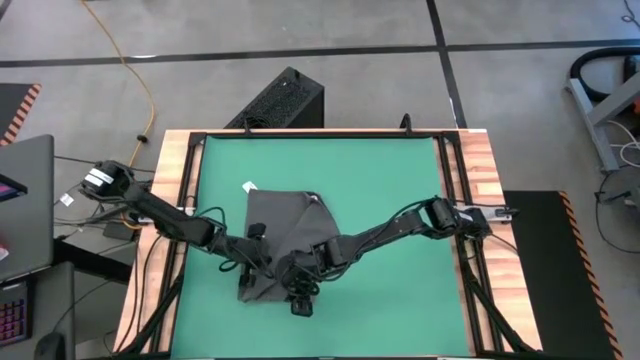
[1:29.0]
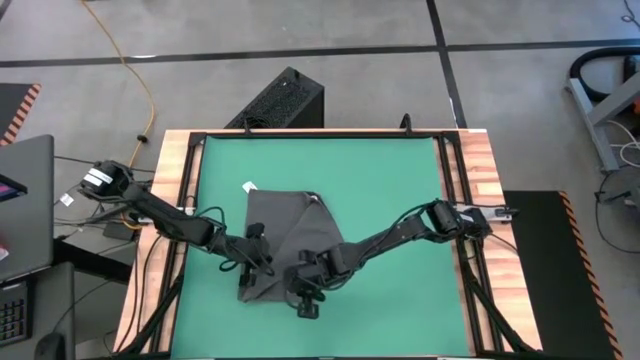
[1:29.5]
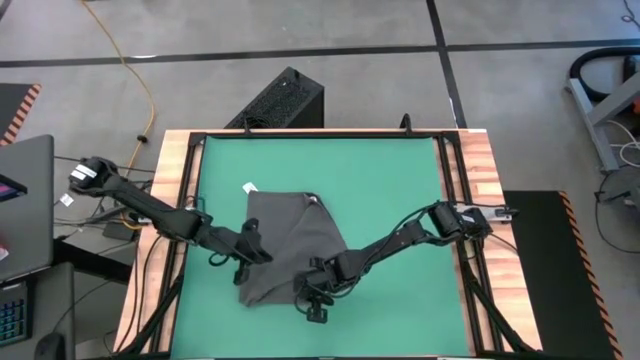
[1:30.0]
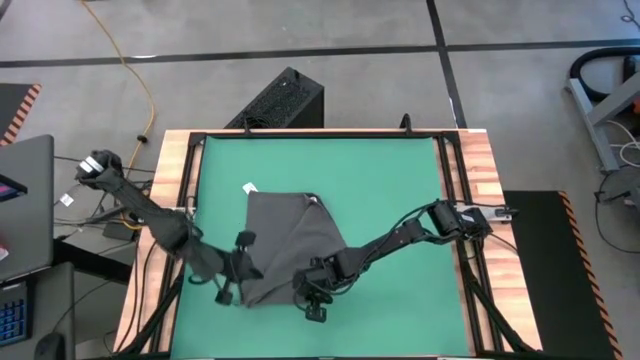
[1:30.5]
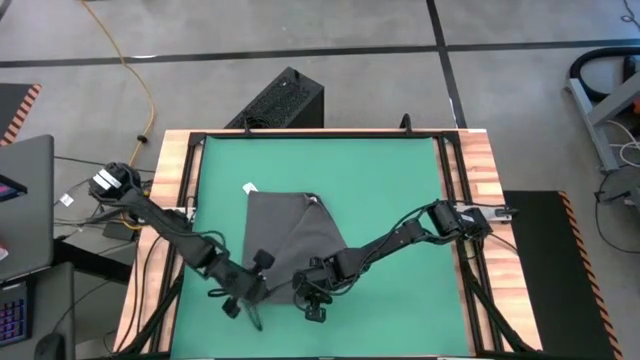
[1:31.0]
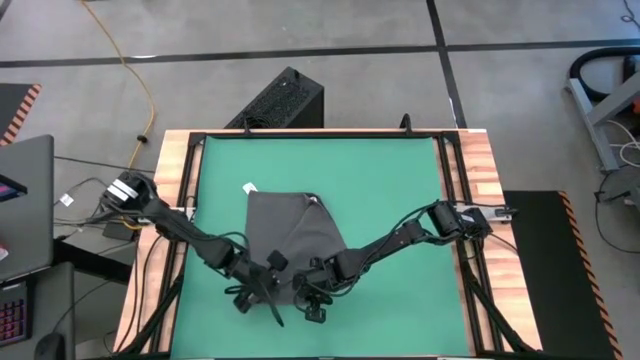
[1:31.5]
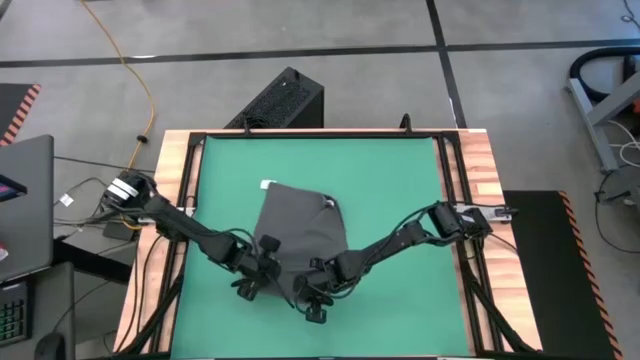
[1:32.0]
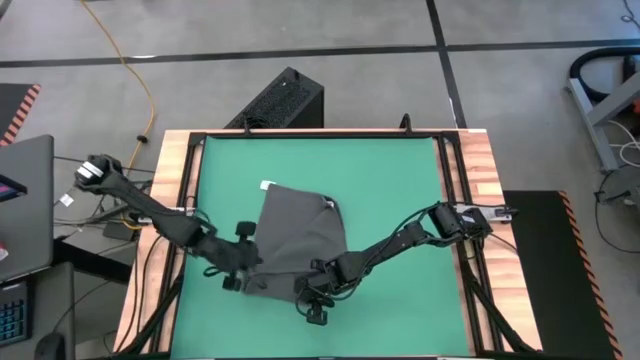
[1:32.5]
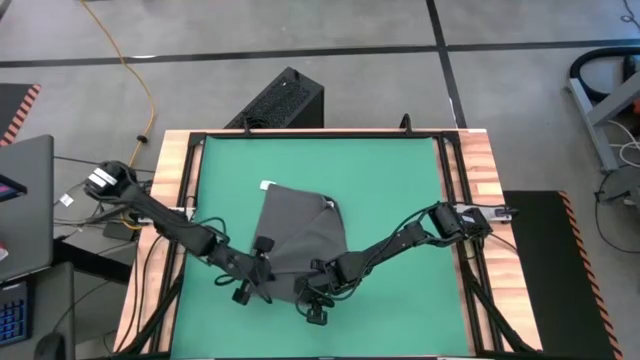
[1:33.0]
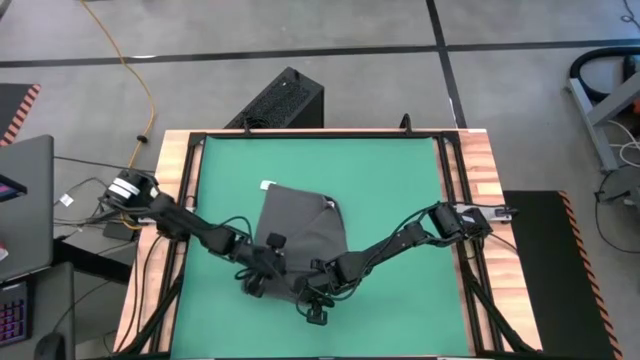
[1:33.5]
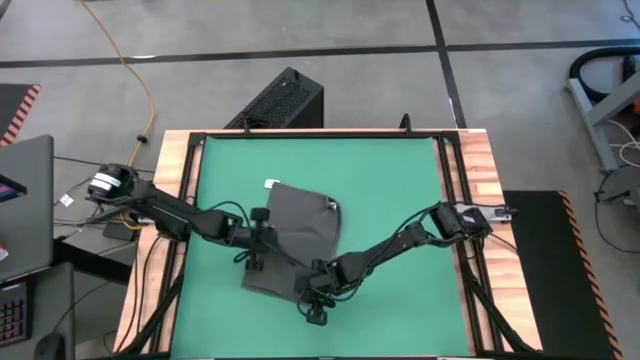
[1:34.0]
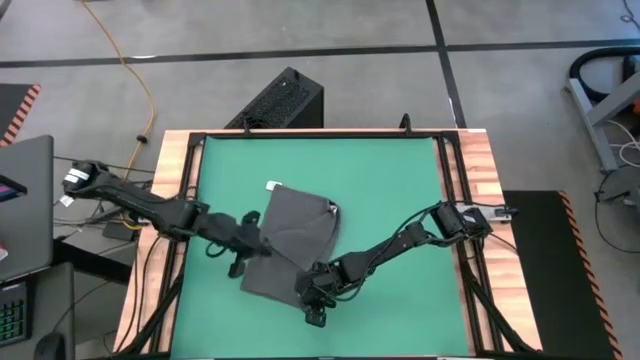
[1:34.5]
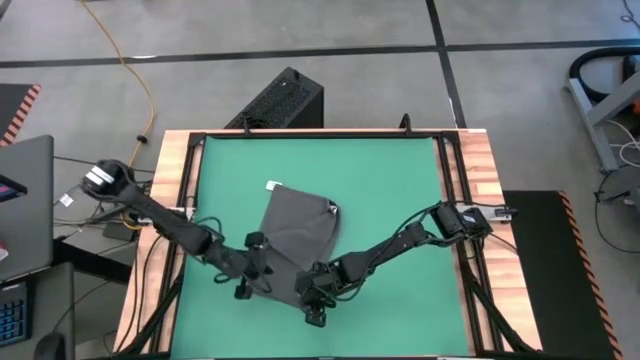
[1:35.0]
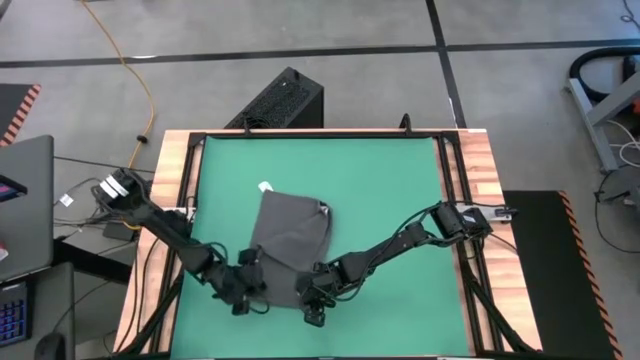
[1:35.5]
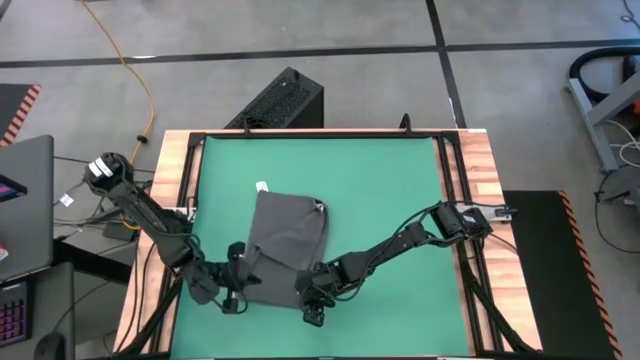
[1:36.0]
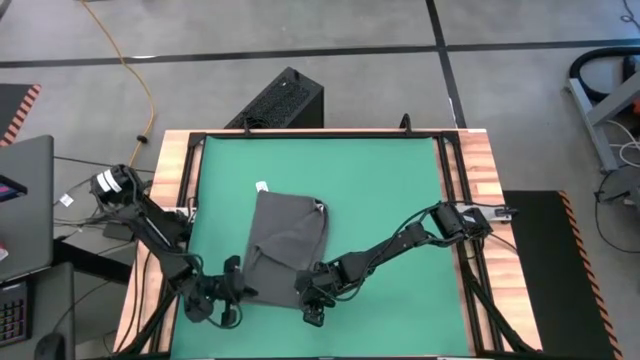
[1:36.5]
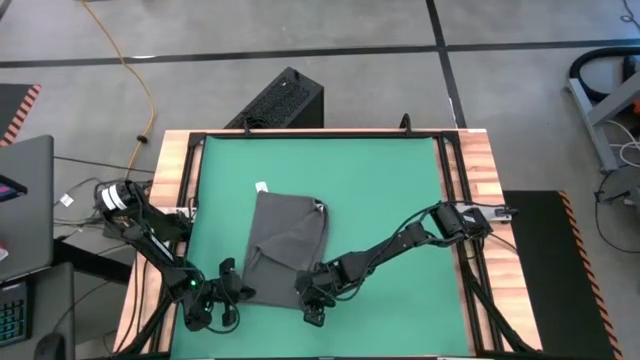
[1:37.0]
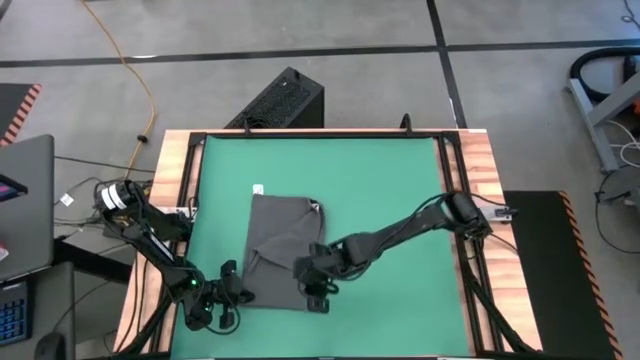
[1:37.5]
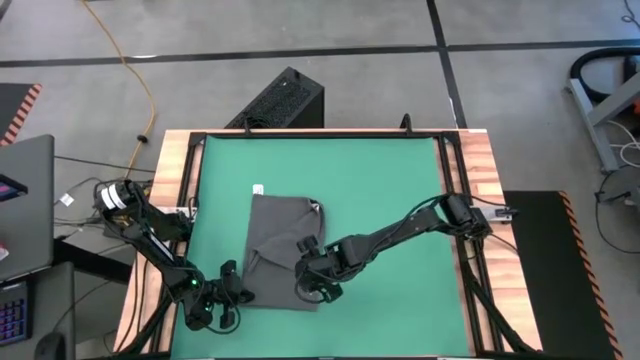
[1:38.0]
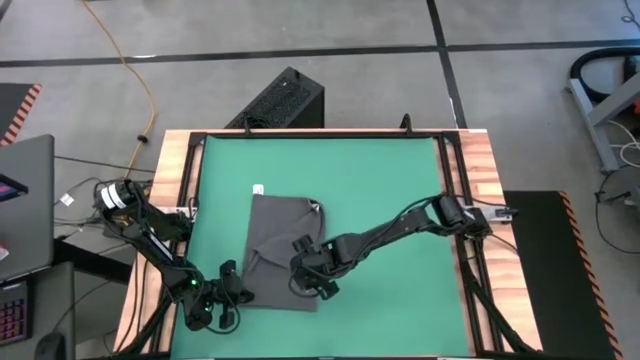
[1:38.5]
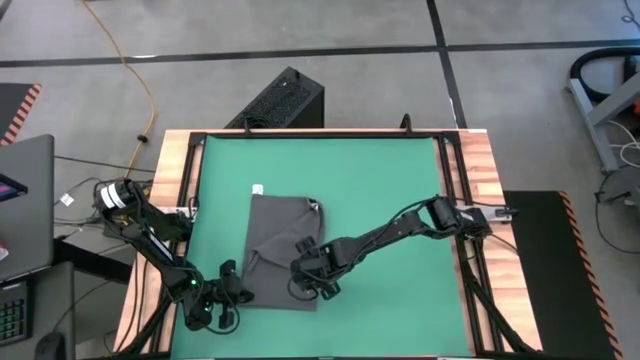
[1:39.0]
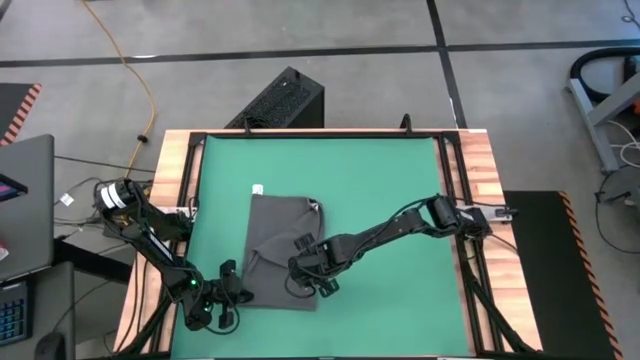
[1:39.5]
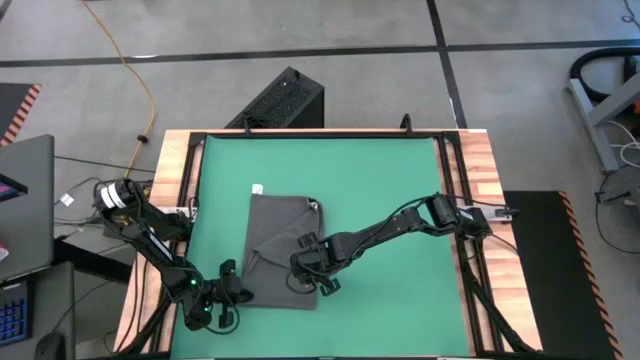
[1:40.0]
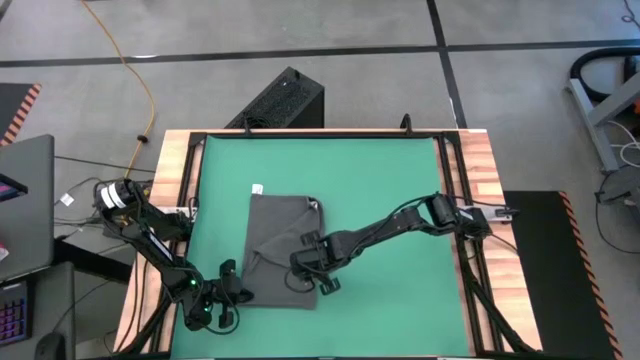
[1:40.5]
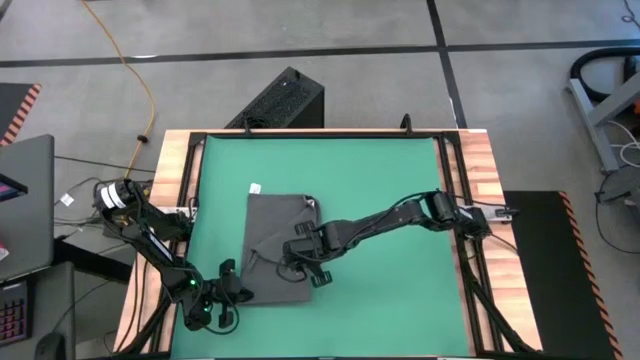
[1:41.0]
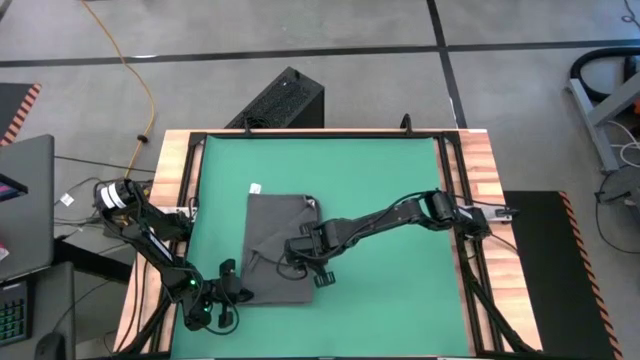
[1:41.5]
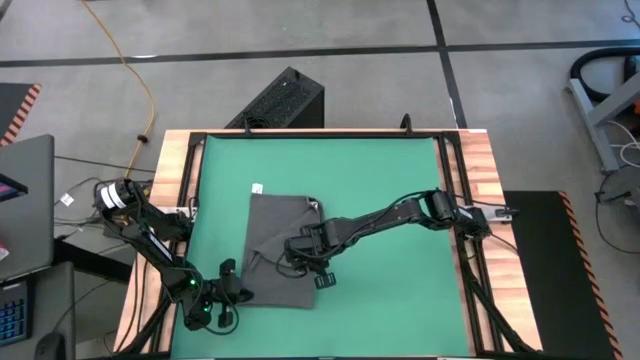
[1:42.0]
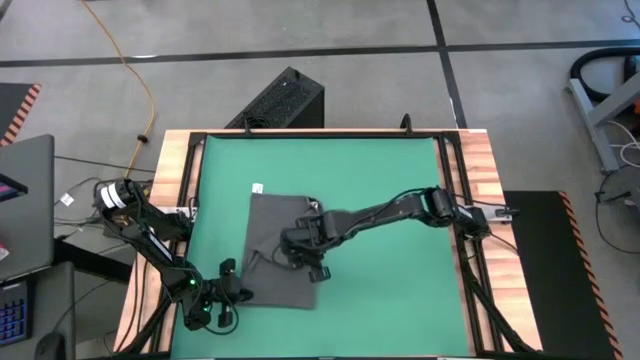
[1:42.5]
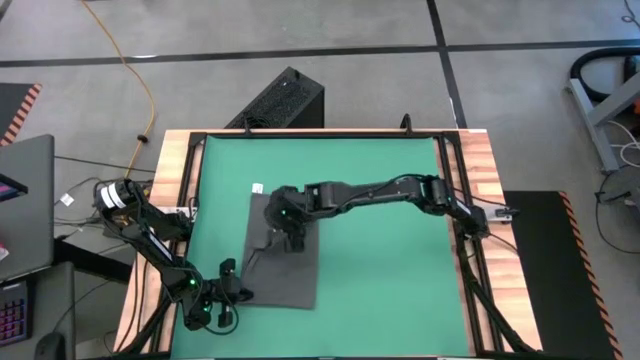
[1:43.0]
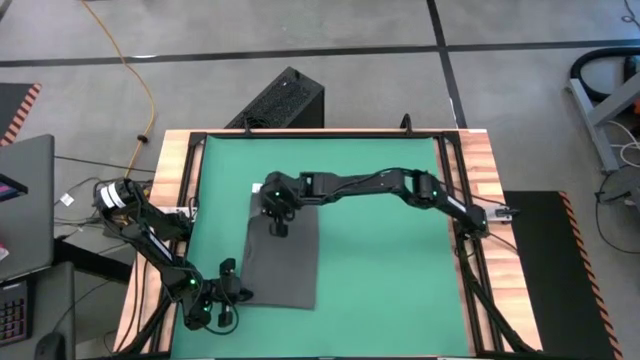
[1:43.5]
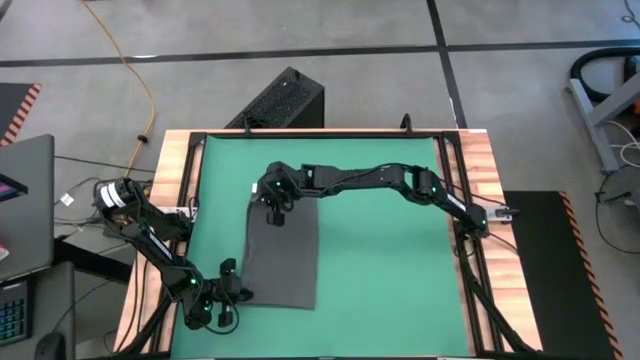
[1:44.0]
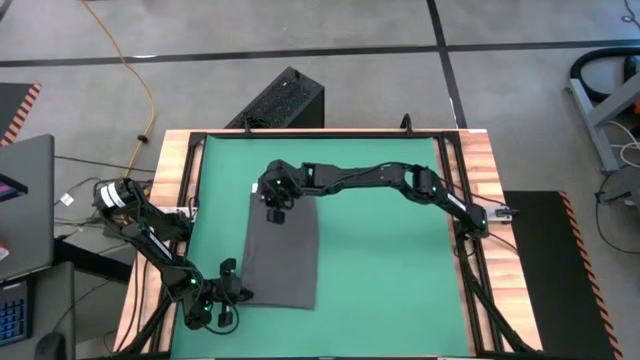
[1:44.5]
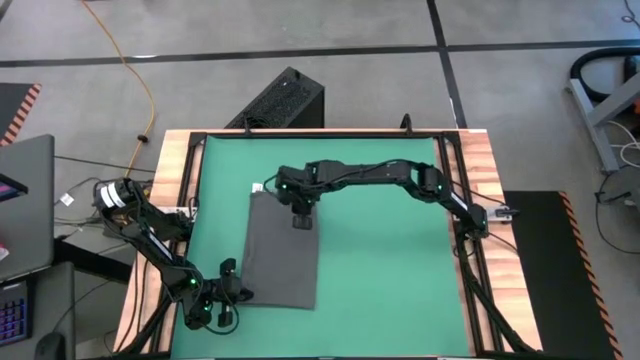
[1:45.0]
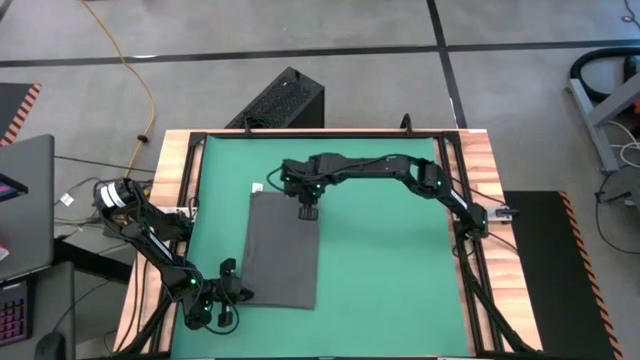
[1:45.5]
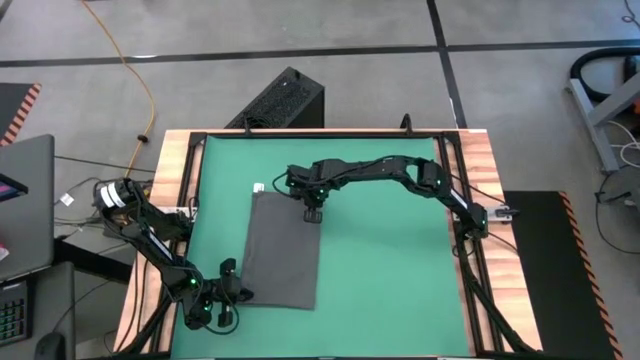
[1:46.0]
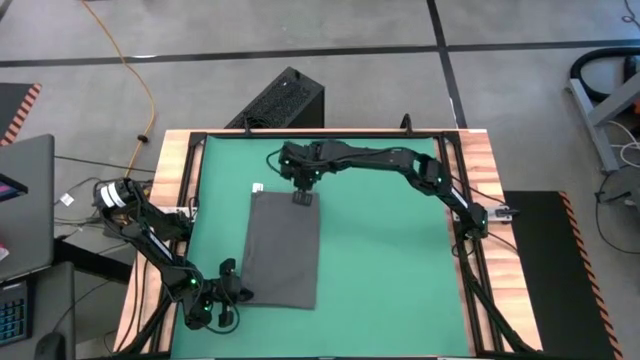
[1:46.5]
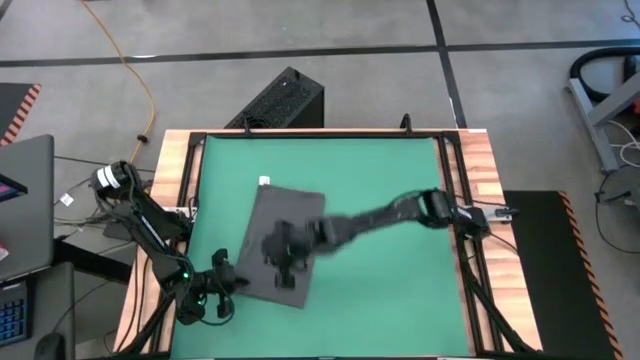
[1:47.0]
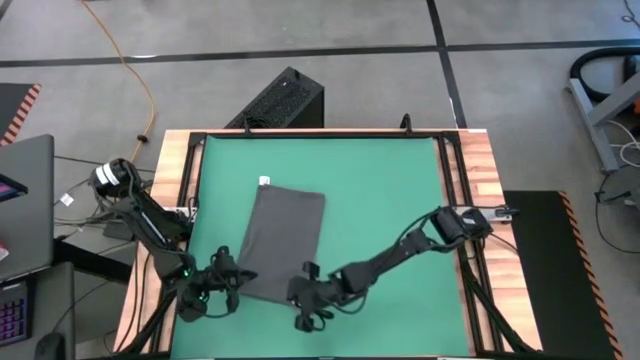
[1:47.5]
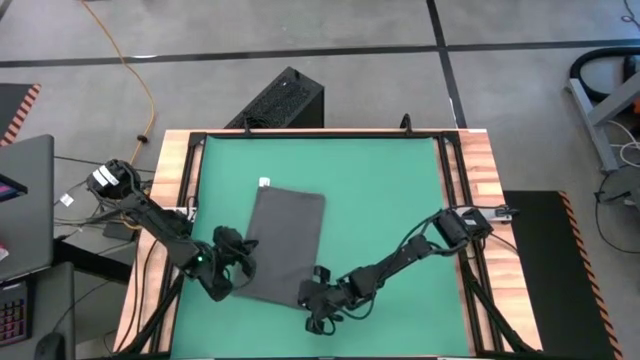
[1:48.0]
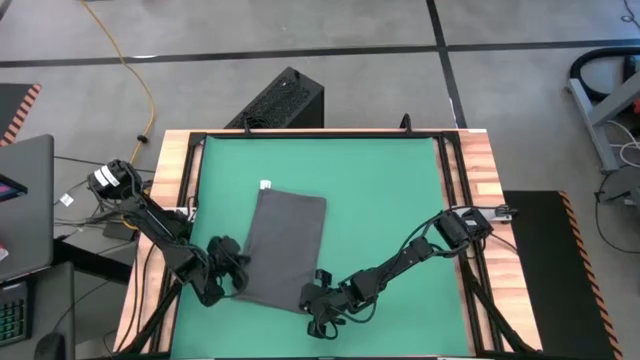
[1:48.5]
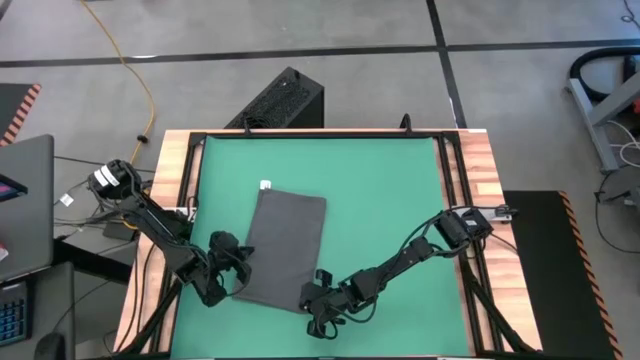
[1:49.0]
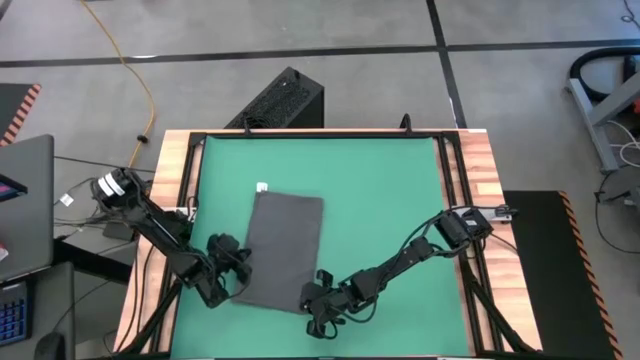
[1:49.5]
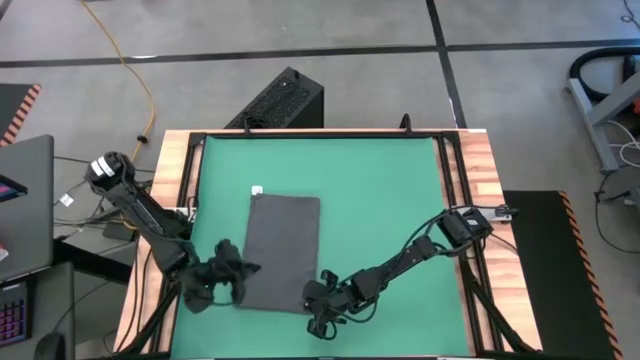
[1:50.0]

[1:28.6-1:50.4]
Task: Roll towel
Fold the microfiber towel
